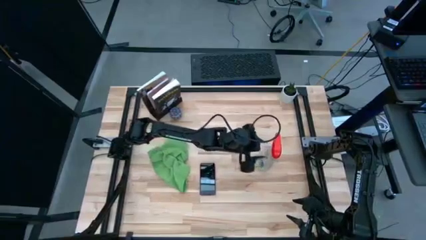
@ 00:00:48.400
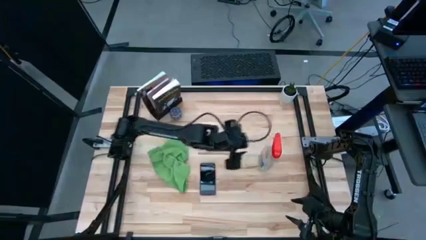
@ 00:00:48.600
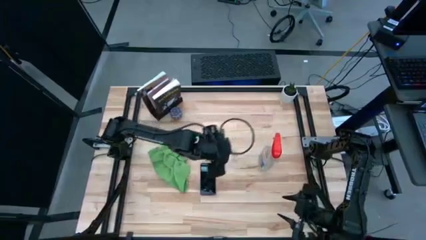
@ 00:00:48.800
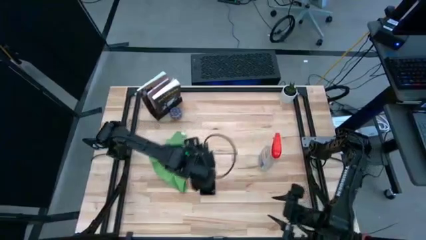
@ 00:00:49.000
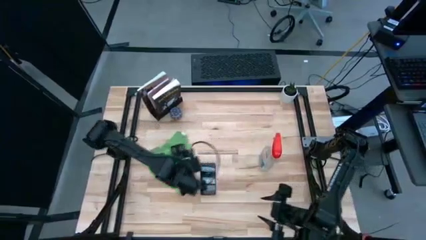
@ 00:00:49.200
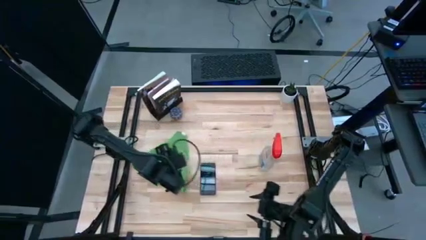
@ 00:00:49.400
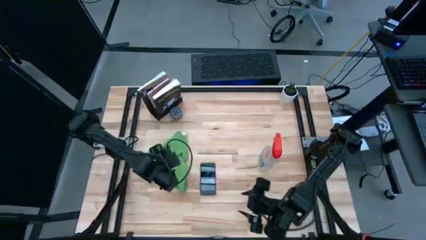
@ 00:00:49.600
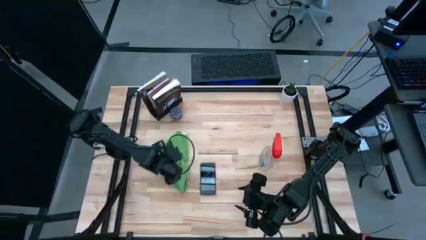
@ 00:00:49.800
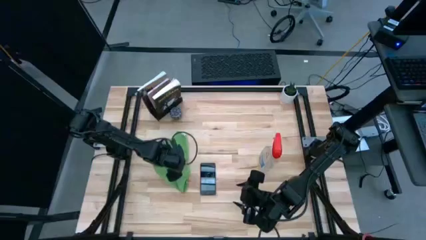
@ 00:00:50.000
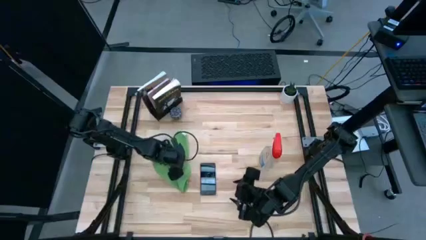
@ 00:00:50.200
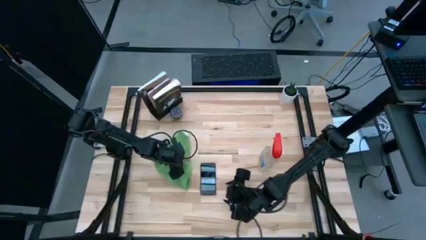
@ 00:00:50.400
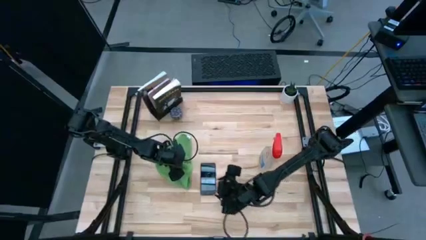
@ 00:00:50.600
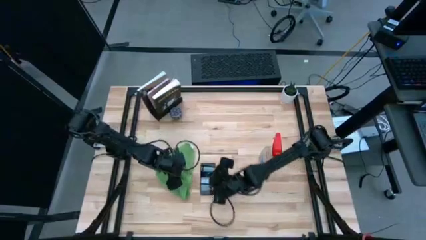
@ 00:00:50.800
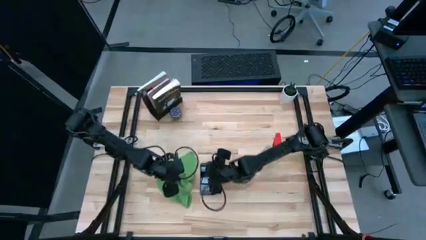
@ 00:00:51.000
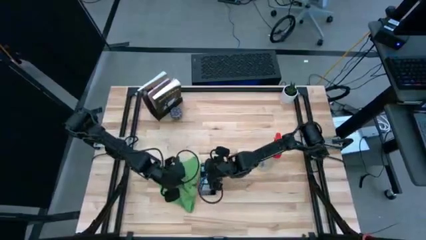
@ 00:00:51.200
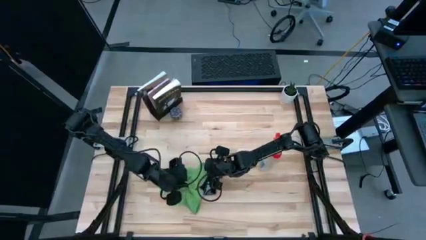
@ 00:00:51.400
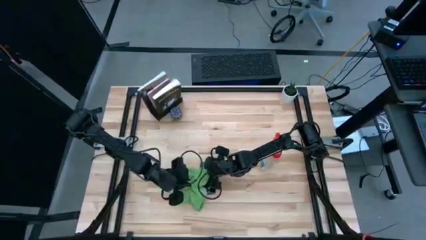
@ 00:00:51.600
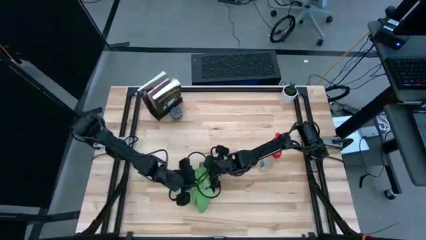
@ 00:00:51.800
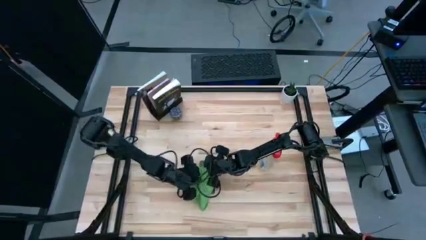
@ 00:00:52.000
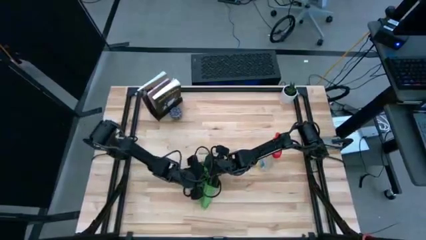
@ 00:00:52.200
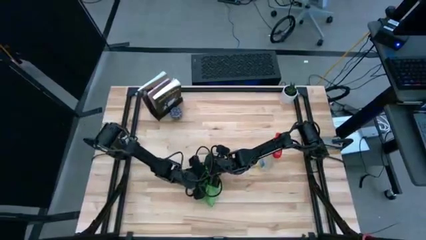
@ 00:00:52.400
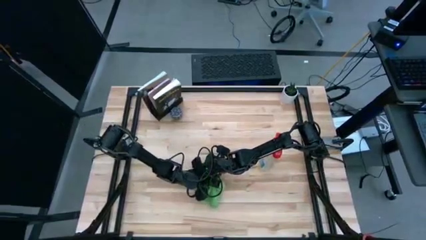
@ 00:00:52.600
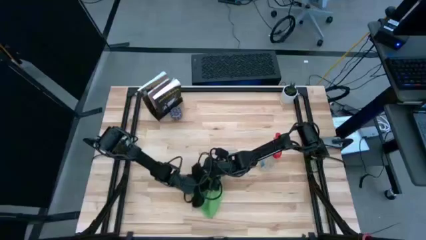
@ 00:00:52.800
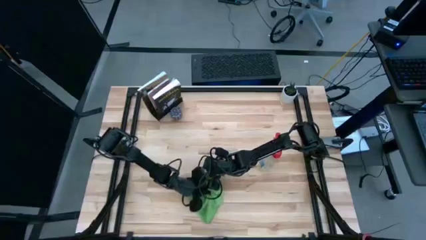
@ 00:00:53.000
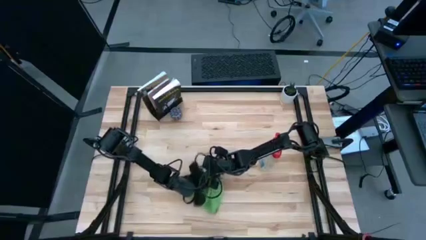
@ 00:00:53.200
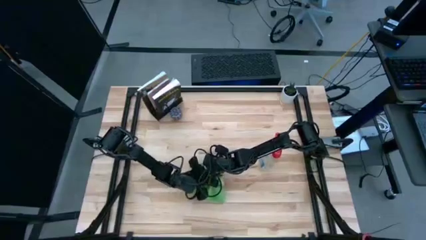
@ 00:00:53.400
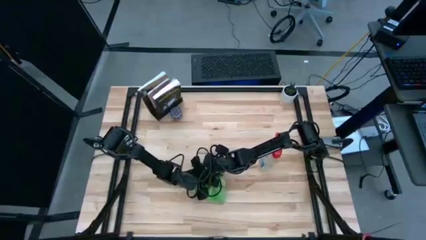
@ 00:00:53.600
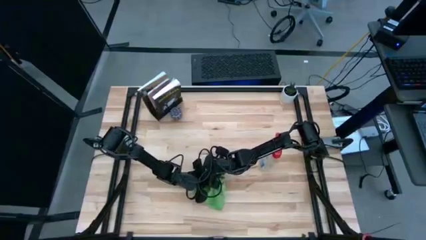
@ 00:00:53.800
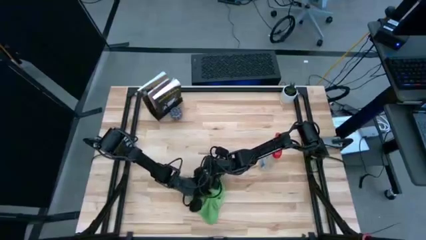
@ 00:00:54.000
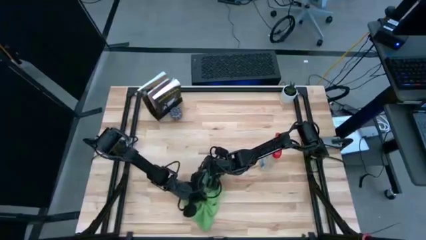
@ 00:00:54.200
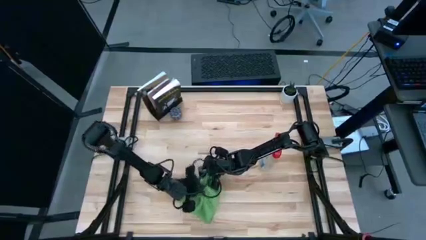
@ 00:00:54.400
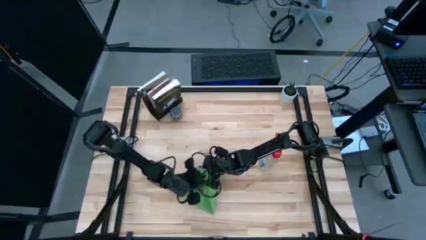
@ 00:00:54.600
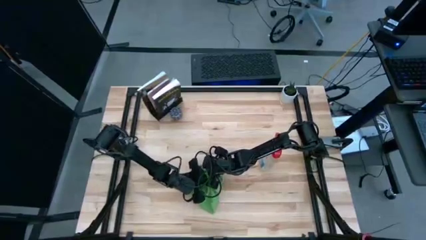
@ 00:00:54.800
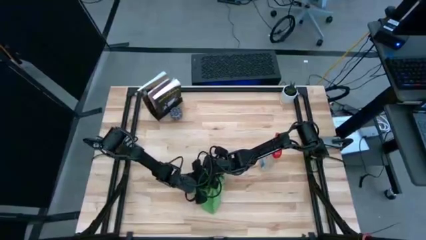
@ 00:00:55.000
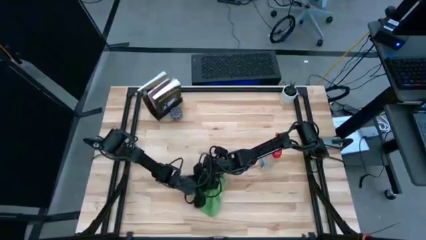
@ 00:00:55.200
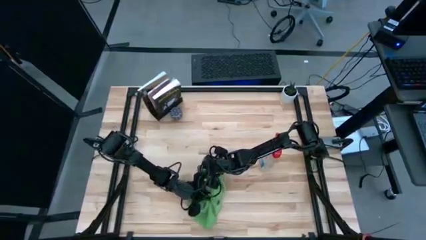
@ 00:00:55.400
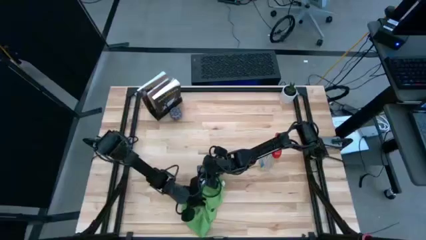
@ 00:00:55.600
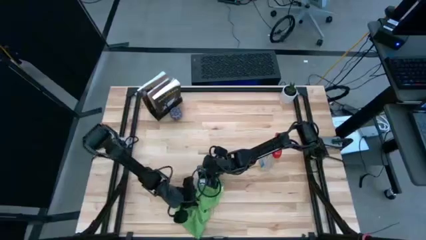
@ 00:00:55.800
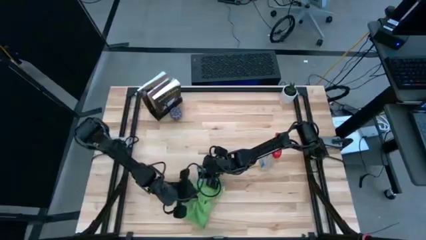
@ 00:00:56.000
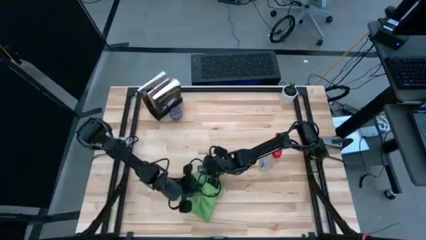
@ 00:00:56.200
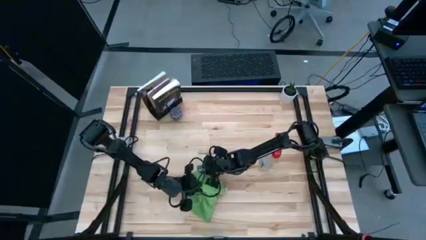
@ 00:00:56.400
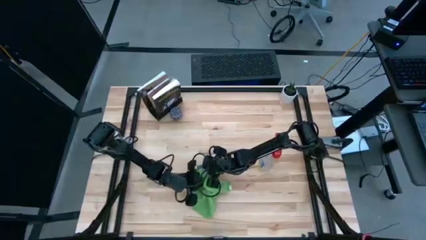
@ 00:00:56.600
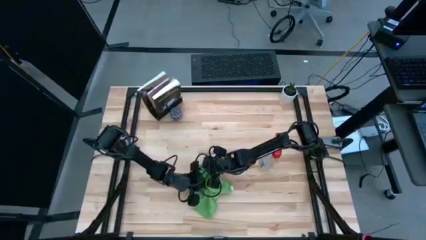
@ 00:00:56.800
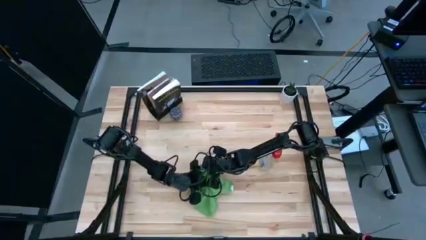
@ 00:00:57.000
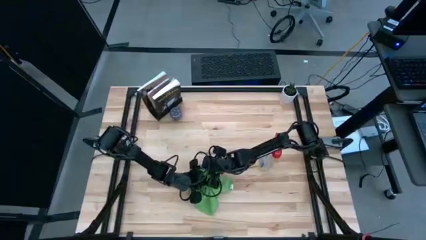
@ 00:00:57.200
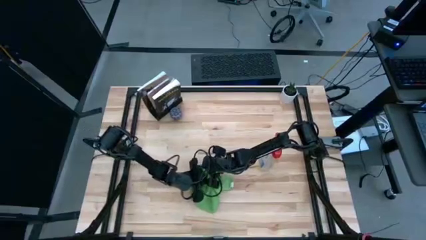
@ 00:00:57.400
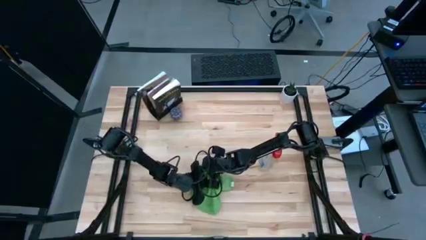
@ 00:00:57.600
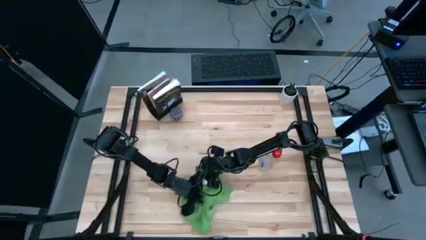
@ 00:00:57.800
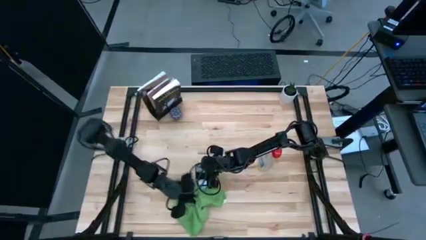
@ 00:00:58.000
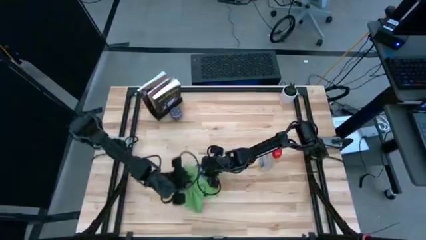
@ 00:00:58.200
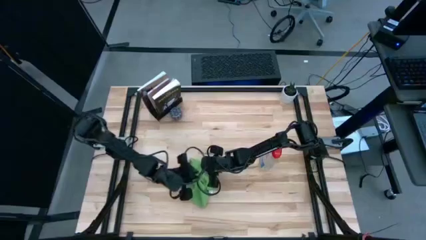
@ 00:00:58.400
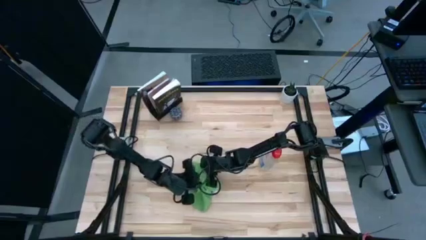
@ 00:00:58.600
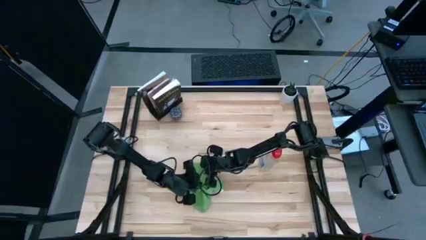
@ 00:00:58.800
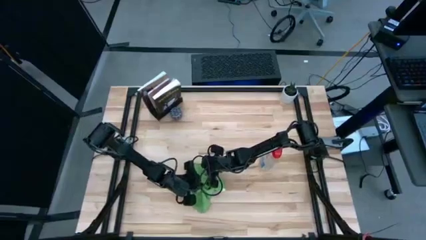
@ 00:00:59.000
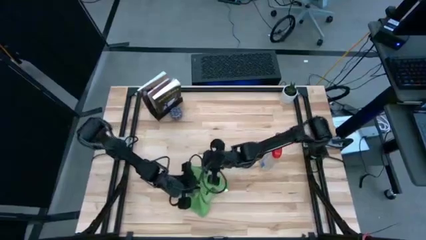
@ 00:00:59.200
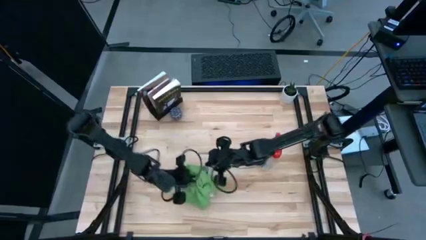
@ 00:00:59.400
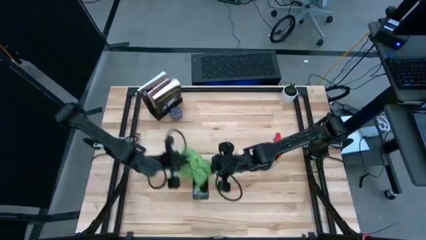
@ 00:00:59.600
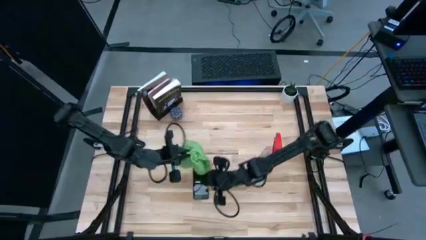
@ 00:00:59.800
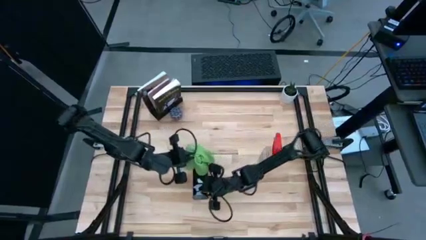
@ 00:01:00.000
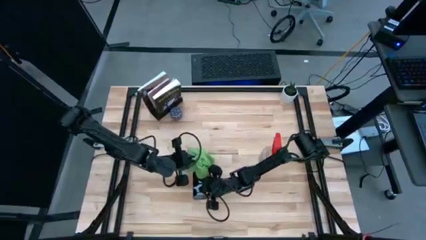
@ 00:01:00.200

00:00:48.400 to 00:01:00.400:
Task: Apply microfiber cloth
Wipe the front of the pink cellphone with the green microfiber cloth
